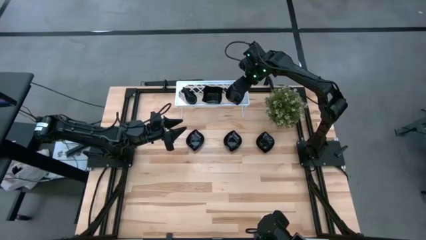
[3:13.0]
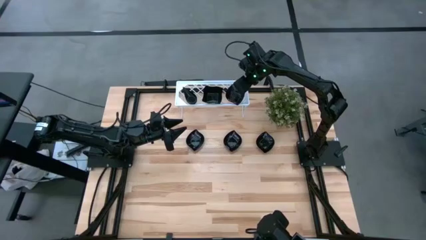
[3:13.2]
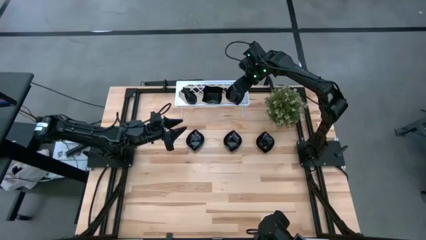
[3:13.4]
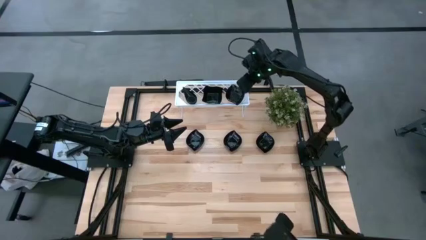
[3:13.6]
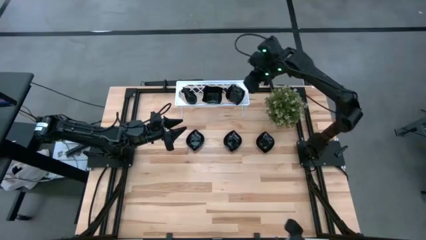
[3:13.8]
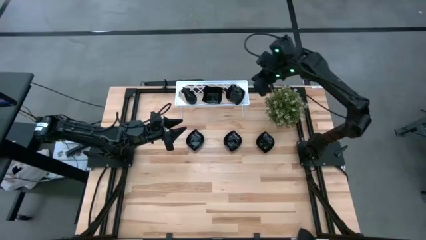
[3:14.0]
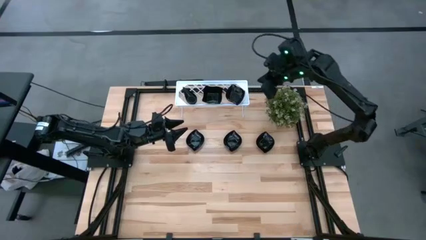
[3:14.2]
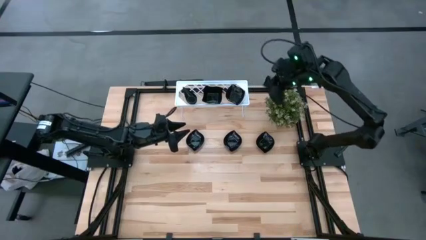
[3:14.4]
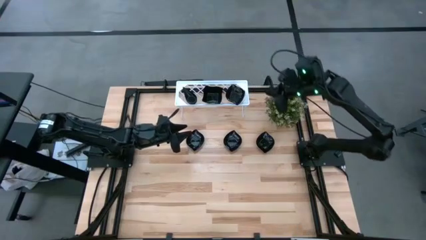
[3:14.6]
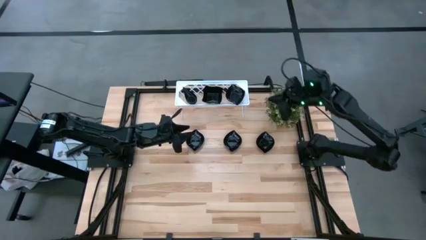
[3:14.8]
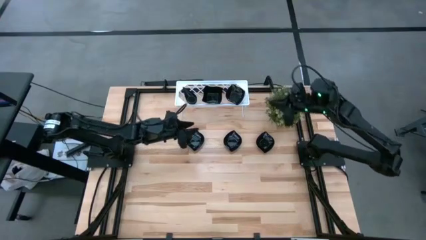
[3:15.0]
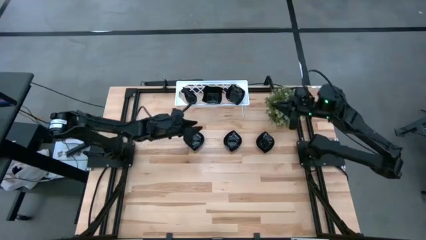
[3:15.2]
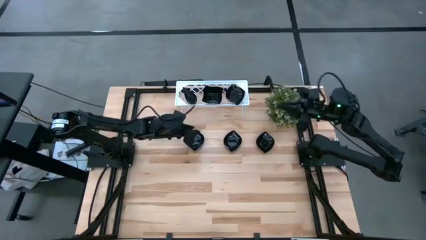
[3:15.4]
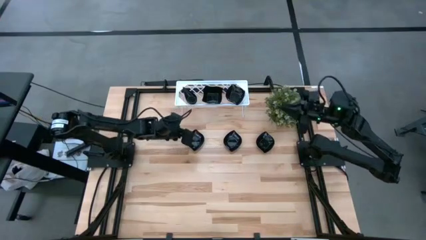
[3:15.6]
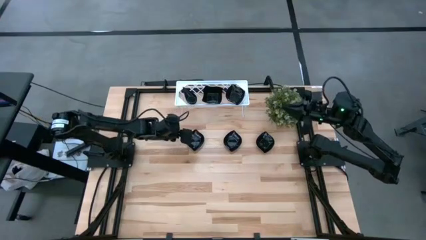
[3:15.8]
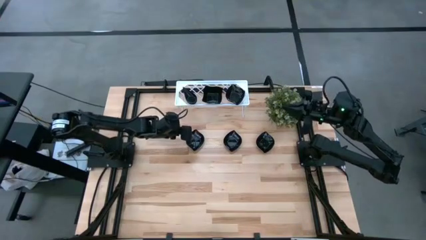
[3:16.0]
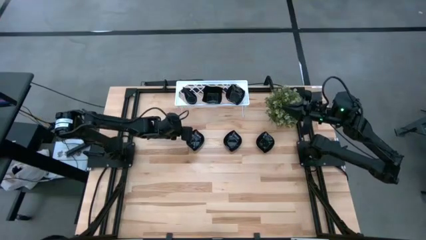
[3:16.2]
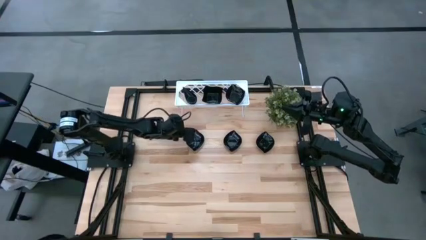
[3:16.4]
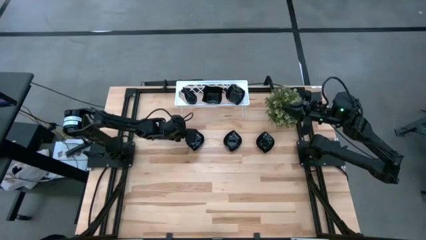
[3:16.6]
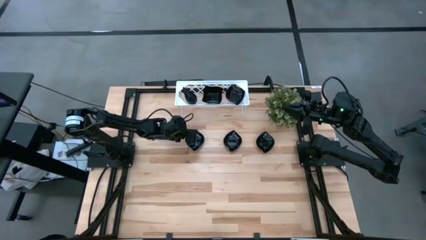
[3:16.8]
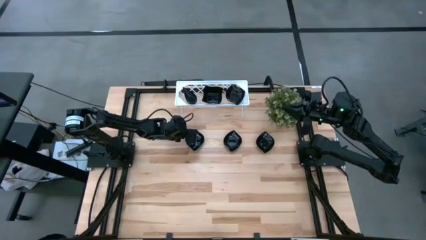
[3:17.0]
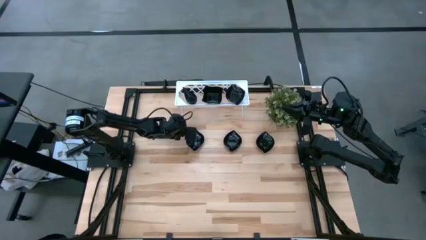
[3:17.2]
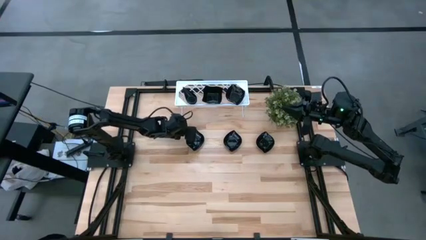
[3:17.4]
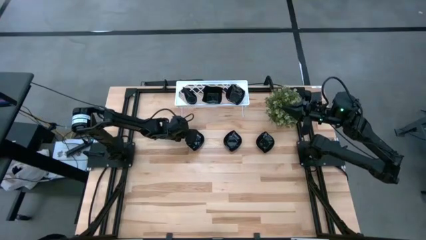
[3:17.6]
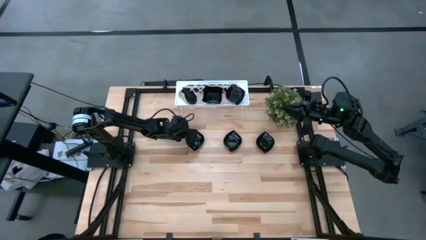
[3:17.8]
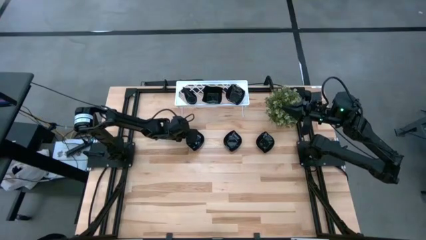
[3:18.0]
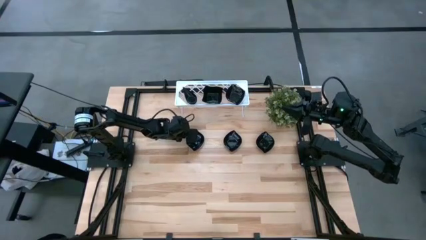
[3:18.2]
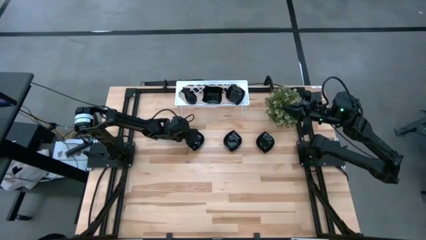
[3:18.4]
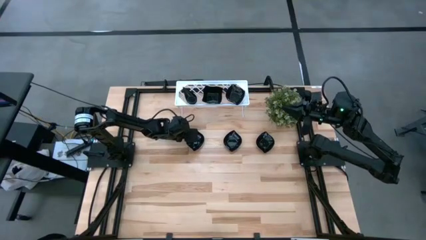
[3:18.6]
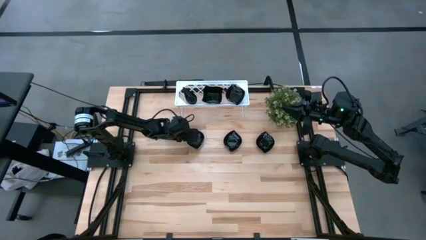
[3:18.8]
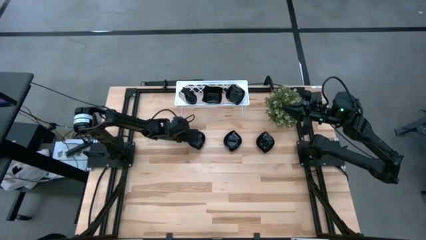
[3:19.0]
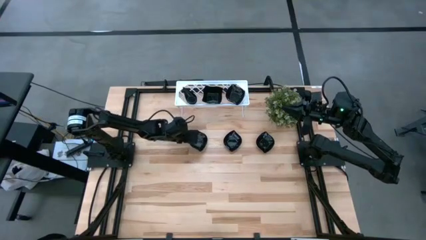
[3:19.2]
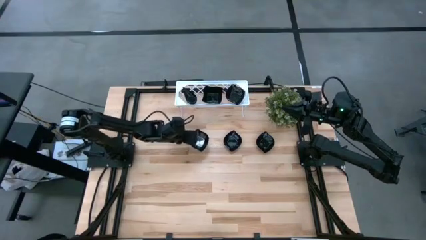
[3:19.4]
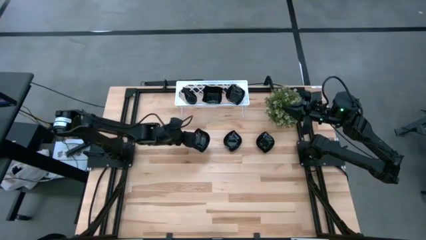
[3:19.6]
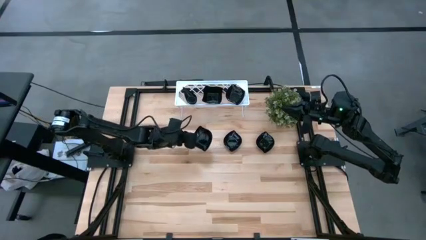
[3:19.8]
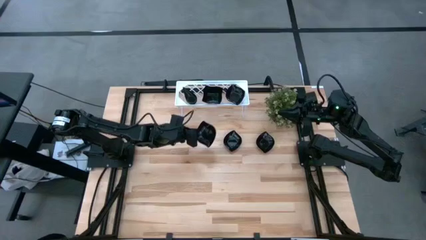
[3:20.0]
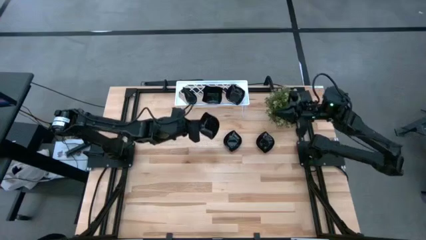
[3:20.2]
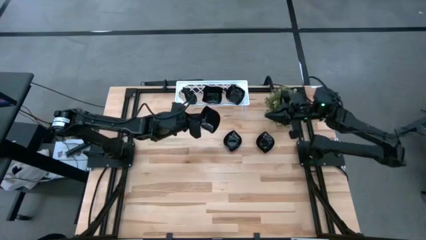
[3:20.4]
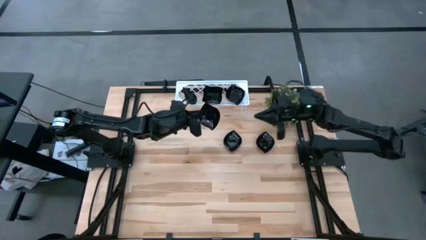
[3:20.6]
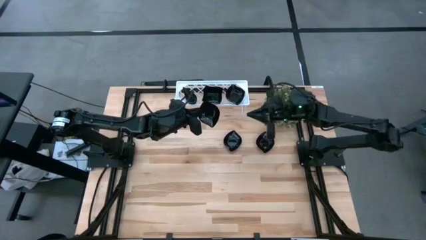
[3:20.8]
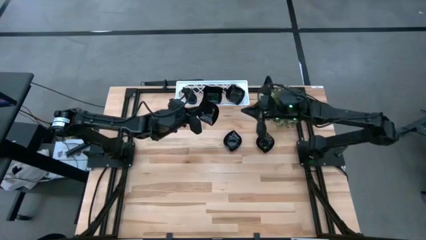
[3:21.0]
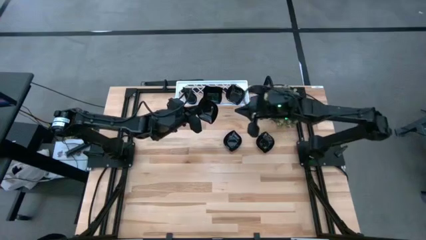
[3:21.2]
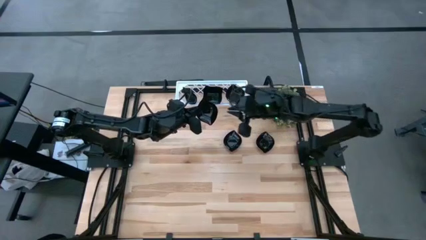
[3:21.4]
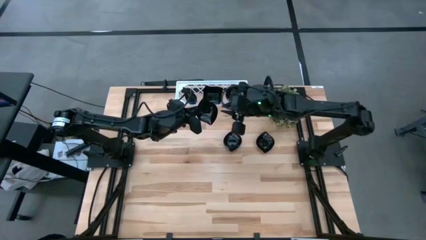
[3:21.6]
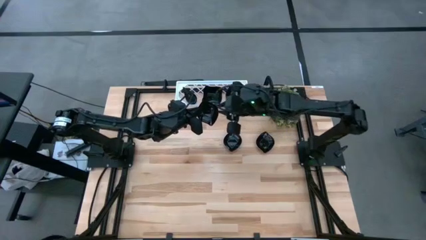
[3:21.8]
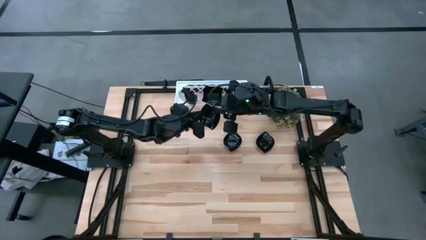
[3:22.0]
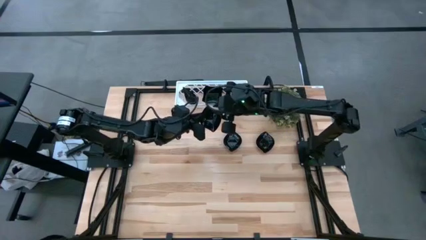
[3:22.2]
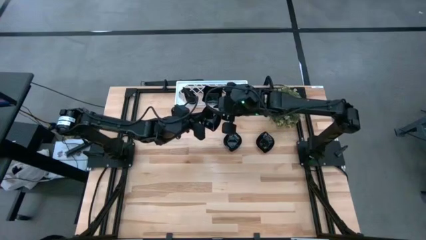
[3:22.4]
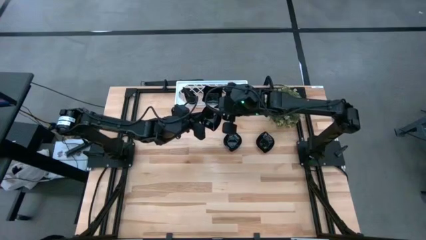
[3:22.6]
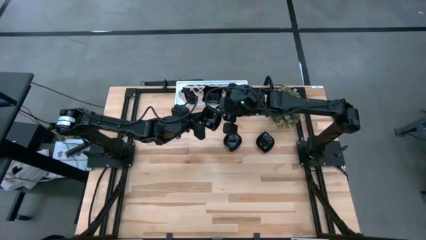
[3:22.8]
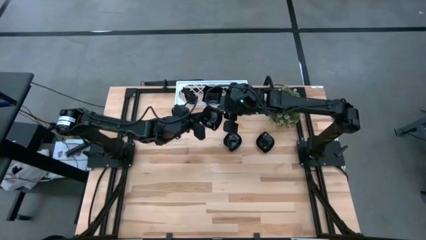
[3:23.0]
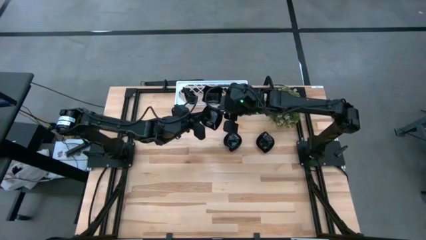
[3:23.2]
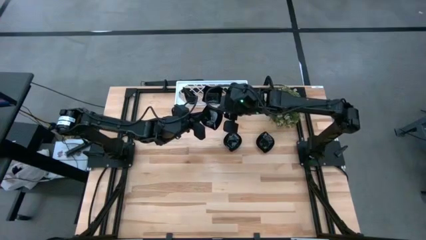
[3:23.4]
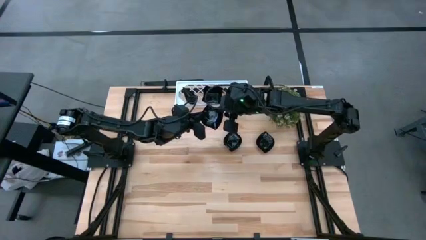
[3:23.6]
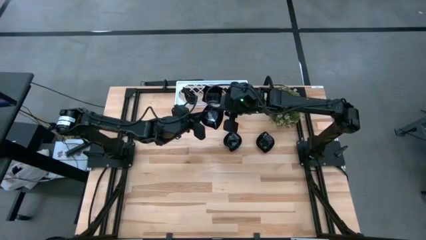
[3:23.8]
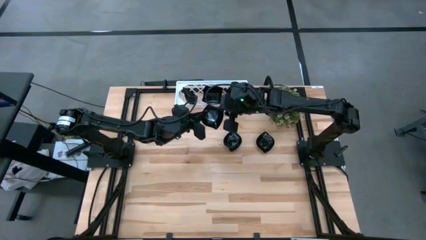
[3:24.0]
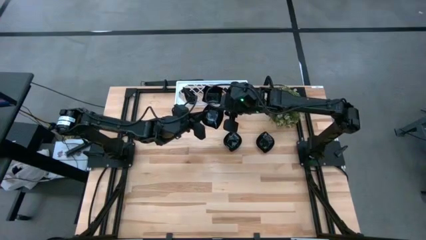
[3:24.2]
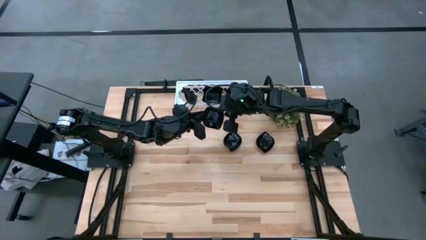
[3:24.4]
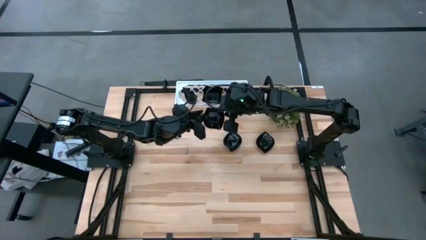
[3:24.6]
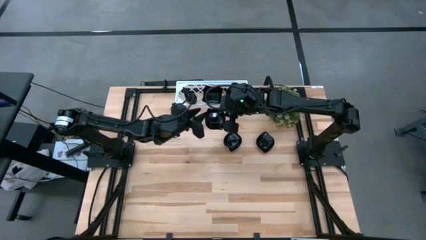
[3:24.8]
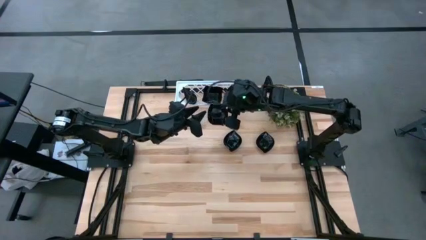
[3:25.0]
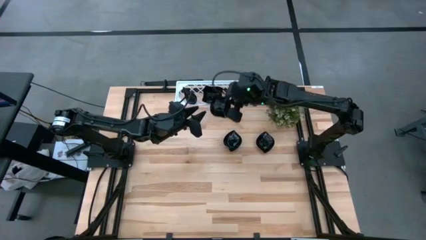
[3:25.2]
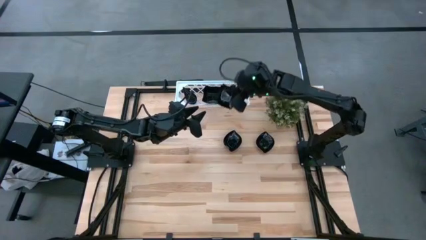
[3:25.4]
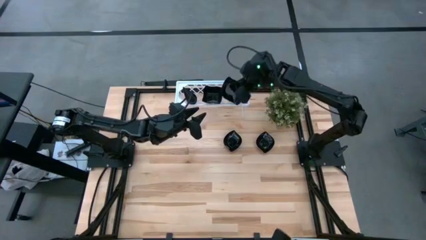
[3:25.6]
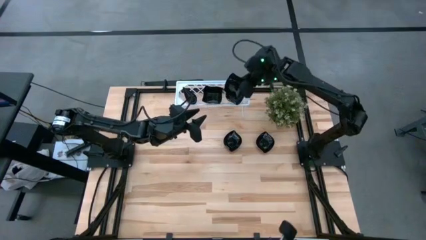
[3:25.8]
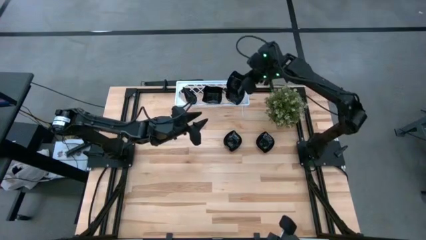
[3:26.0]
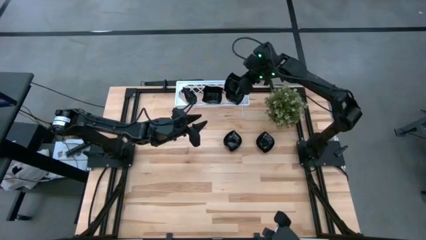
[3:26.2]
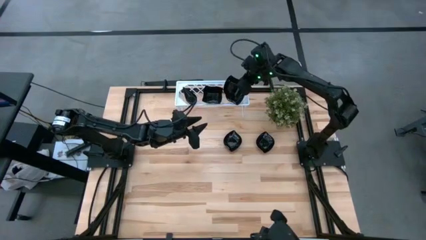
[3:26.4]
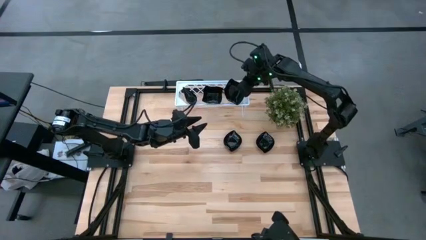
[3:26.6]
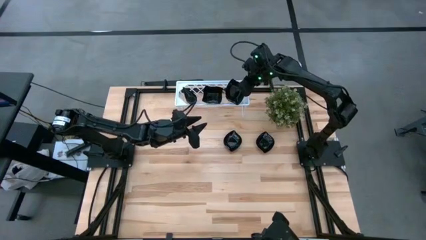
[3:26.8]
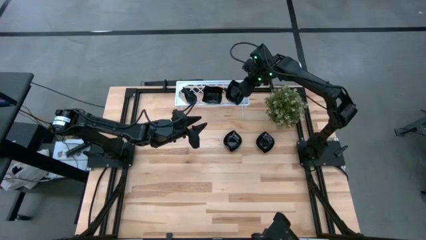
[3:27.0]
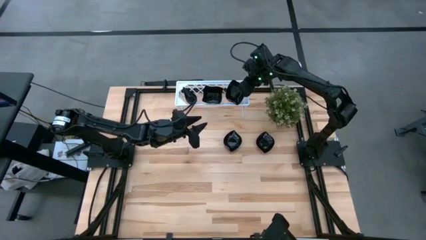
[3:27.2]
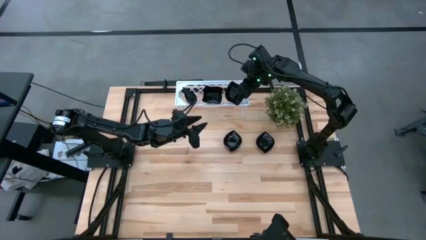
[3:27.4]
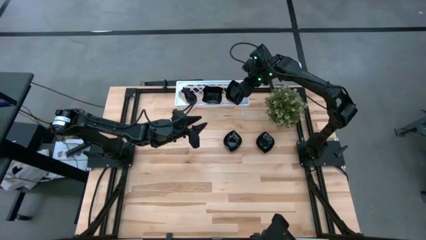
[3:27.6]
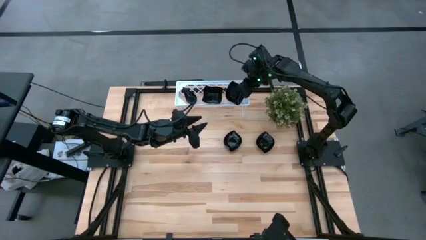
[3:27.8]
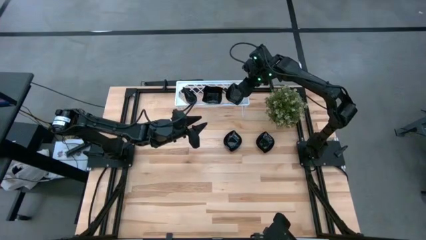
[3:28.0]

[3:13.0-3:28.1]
Task: Pick & Place Mini shaped plates
Stack the black left leaf shaped plate on top of the leaf shaped plates on the shelf

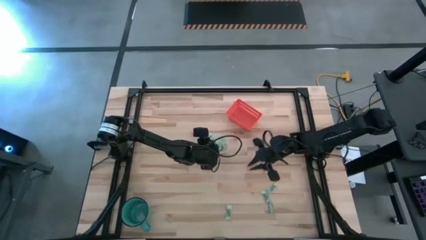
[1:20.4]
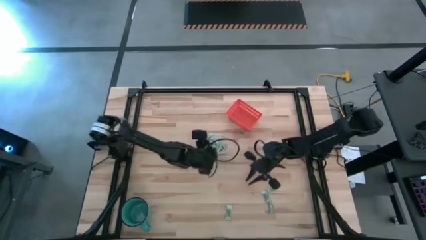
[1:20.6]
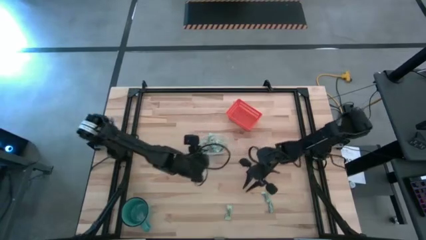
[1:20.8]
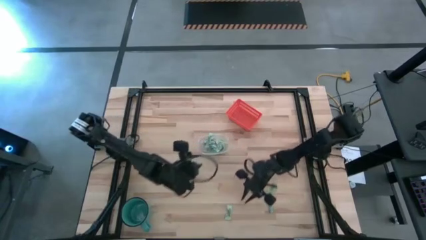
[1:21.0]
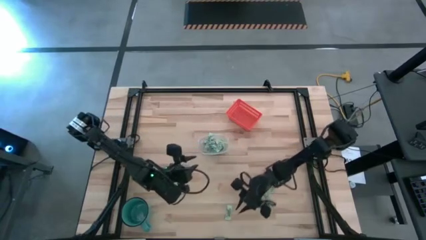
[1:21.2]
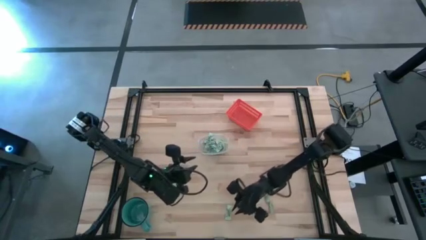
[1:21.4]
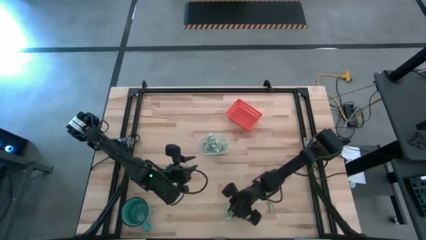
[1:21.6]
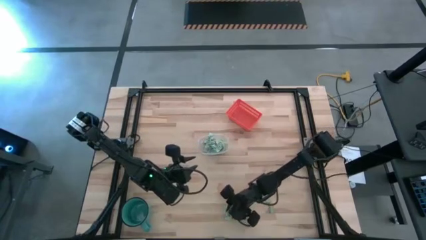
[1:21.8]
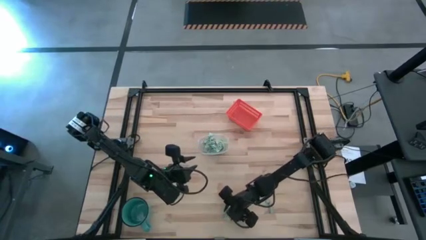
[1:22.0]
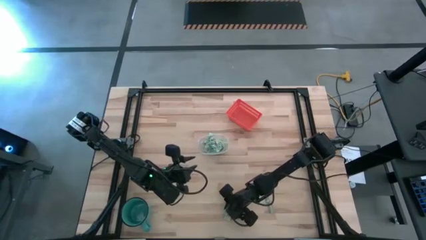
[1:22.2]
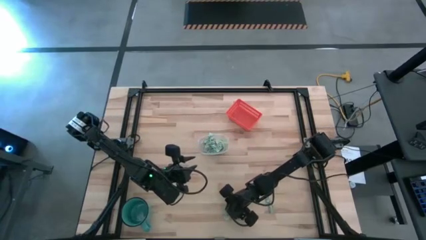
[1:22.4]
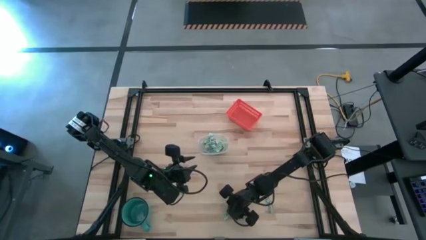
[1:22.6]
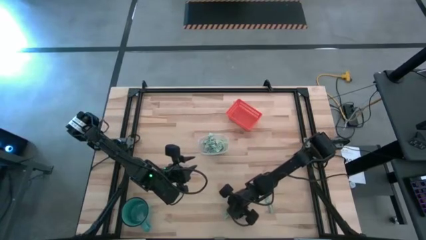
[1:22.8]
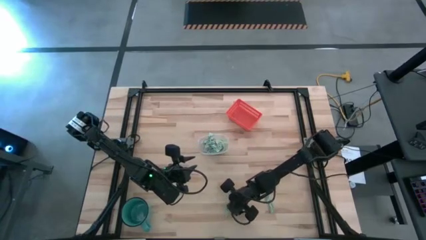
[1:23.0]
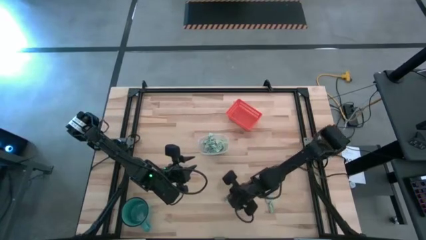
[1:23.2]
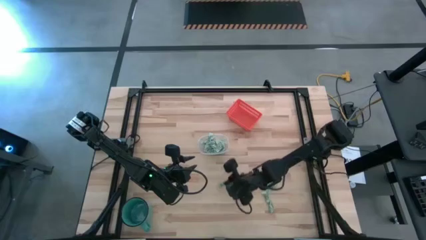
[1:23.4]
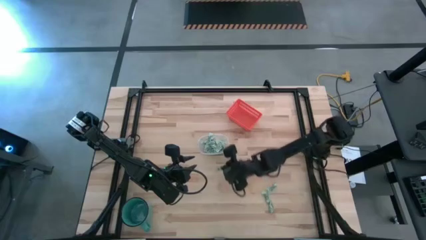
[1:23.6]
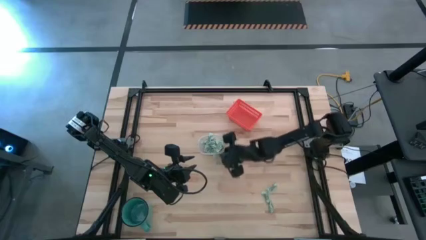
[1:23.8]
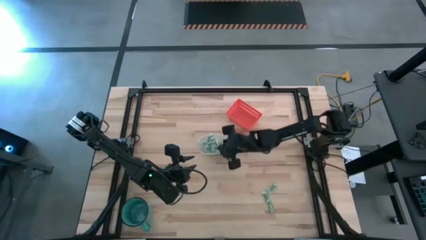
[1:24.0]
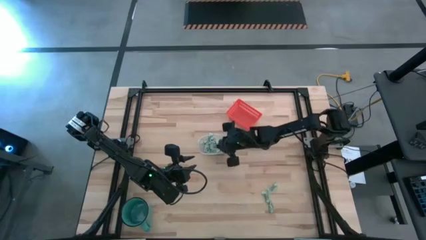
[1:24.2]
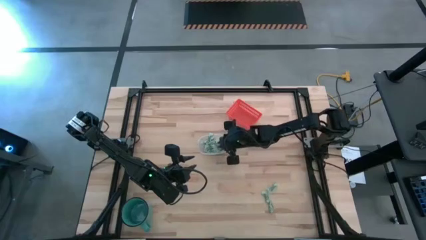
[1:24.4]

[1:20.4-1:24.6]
Task: Pick and place items into bin
Put the stevia packet into the transparent bin
